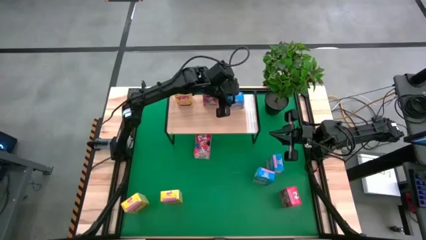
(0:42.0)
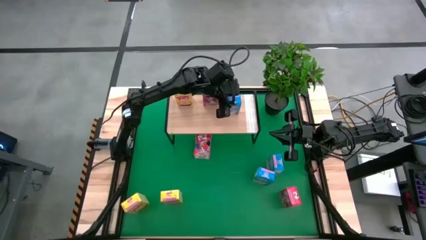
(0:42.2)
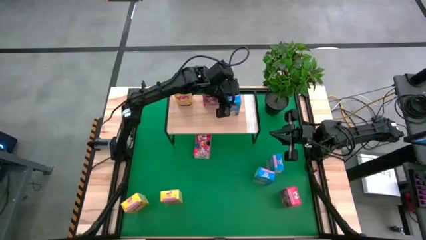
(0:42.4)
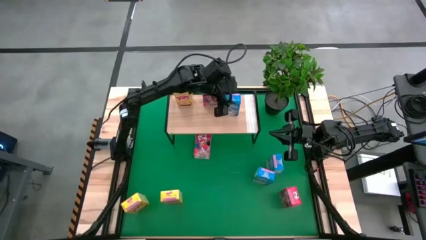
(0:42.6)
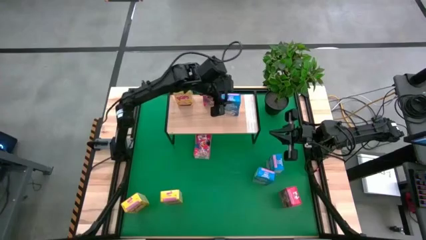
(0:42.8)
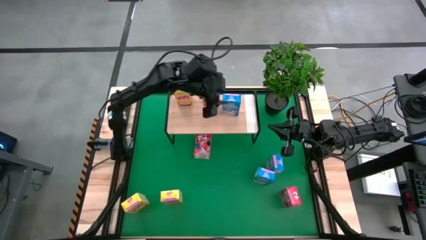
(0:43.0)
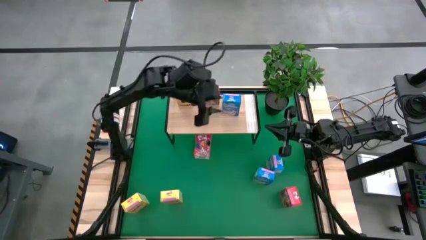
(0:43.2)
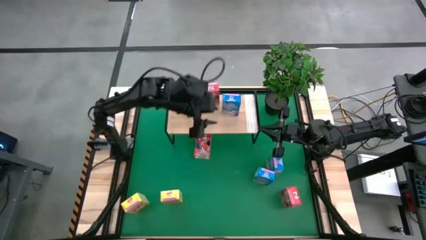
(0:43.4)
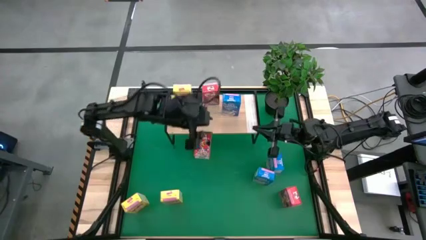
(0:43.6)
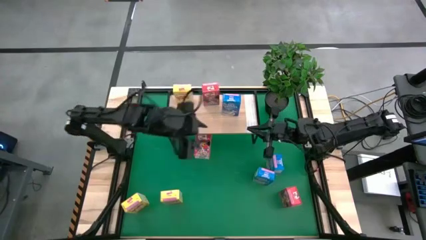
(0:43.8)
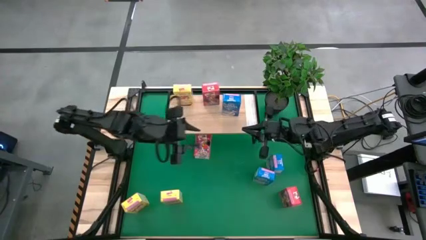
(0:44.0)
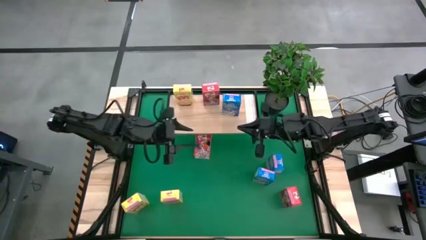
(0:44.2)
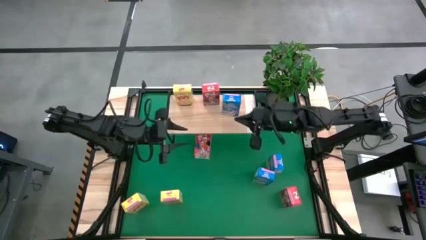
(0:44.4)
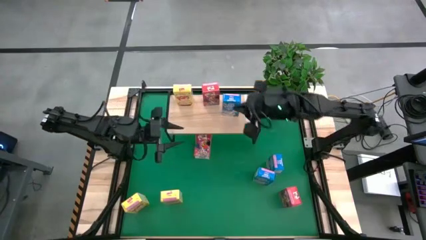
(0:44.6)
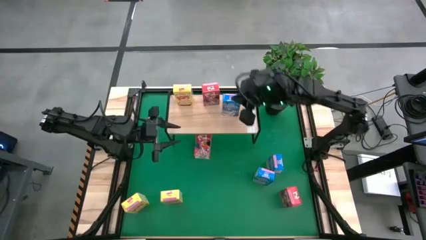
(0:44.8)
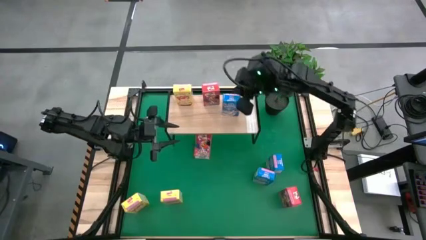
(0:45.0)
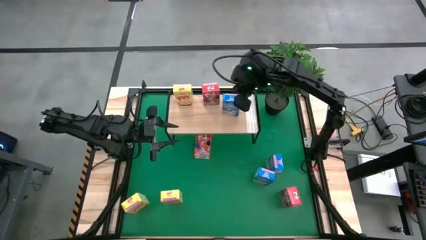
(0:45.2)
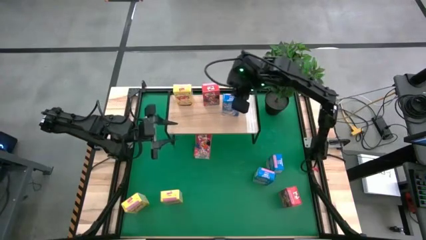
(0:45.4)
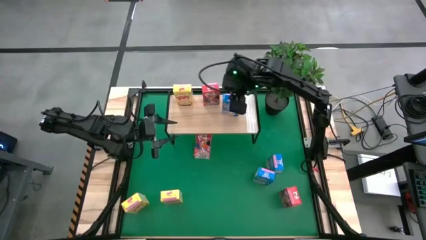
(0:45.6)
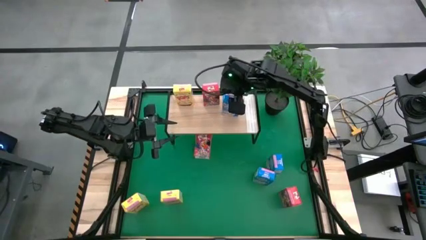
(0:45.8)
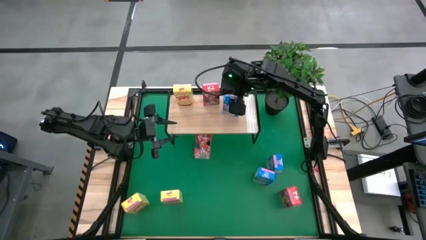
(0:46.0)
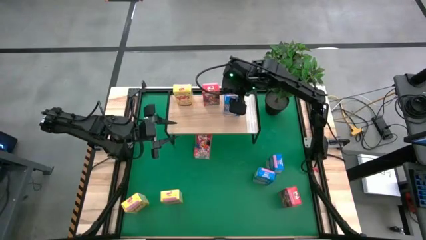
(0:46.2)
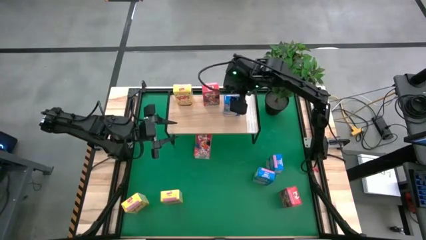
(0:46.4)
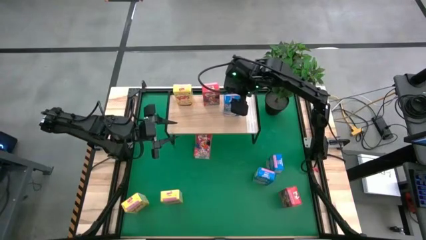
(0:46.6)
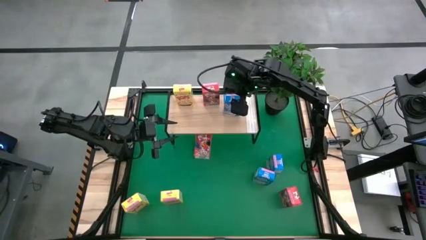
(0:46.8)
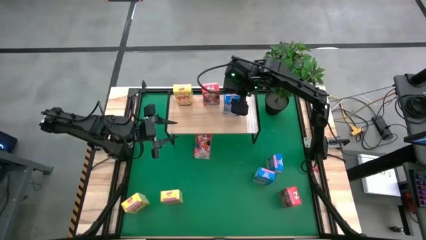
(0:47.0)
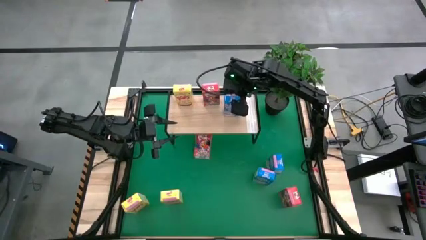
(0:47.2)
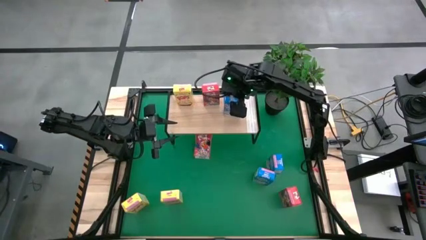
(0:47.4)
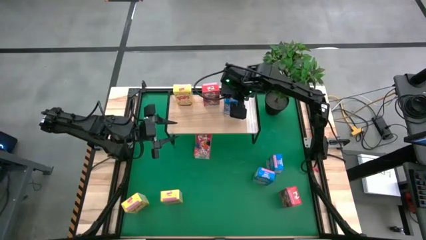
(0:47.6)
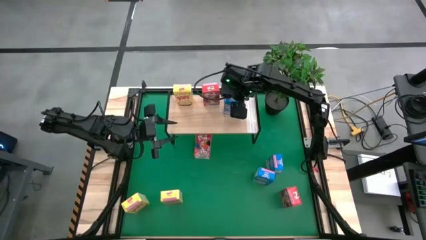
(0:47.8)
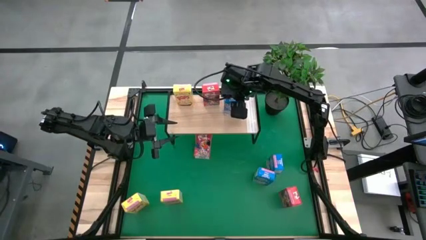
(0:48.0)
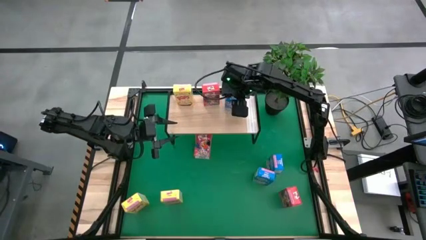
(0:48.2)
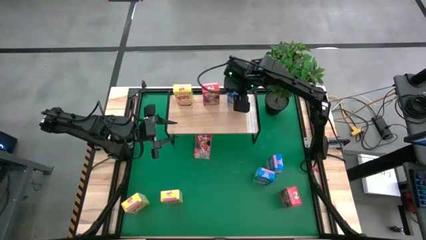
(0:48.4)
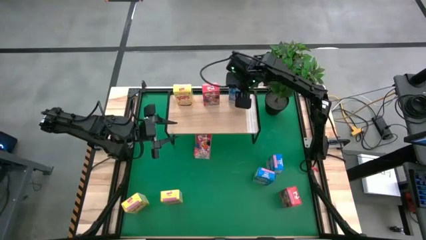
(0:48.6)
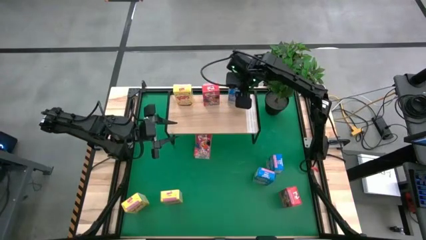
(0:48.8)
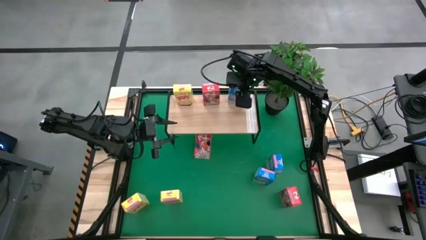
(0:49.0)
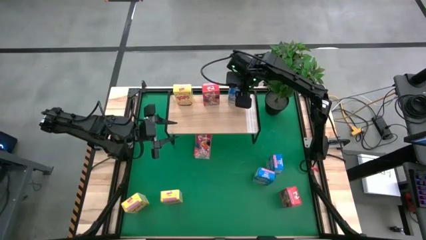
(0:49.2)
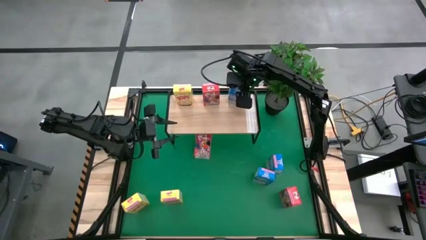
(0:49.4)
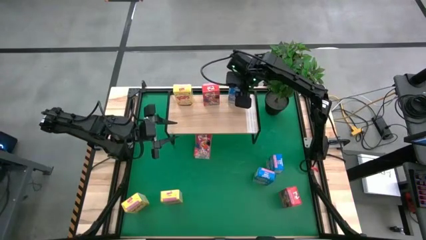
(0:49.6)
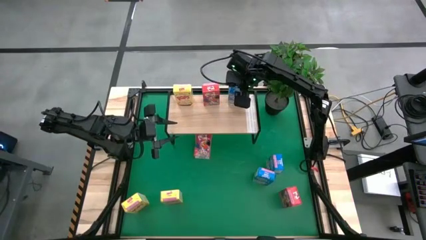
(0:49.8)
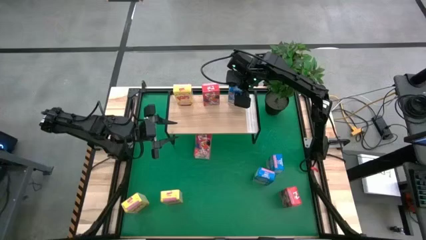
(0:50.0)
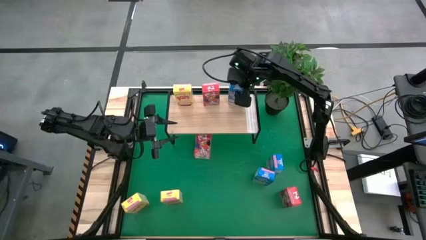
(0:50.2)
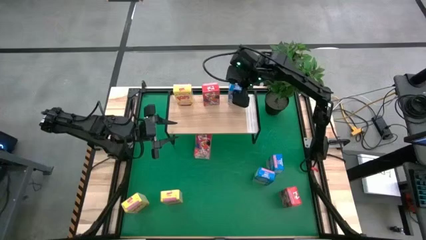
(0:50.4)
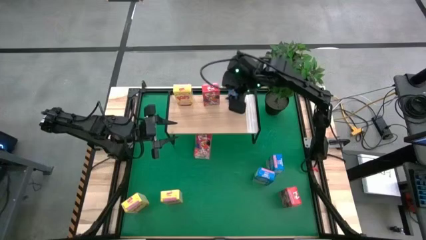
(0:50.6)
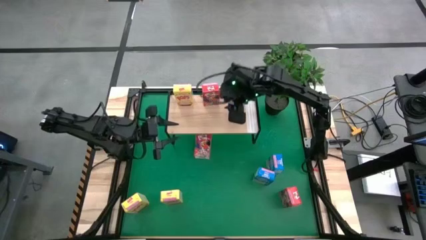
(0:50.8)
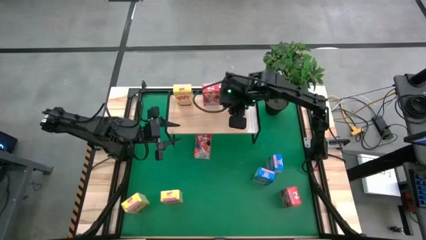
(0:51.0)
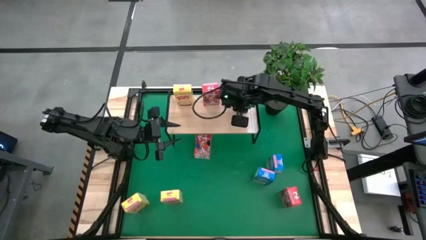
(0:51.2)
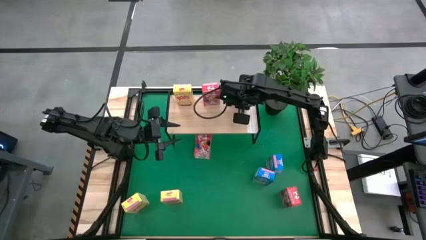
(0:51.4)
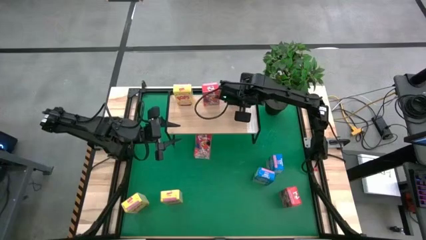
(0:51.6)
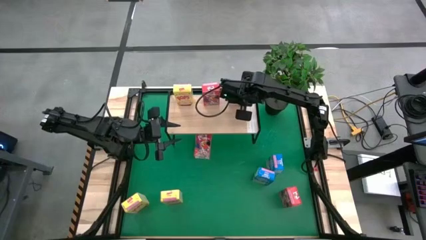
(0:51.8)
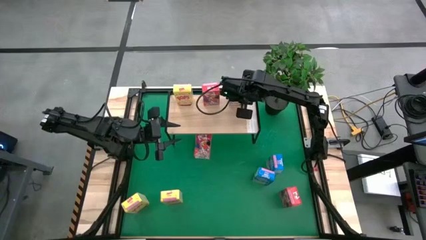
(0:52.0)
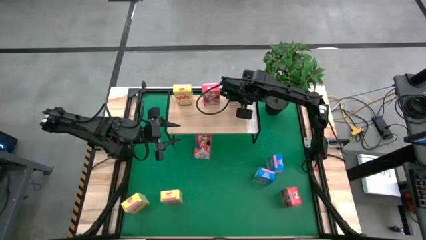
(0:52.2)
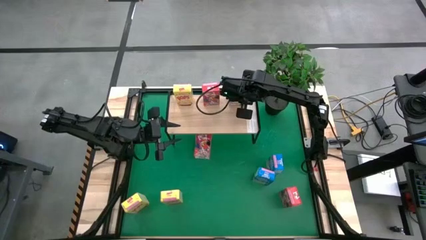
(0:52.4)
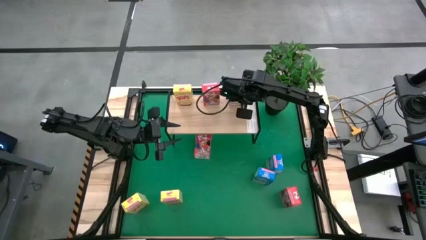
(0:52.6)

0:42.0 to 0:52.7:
Task: Stack cereal on shelf
Put the top left blue cereal box on the shelf

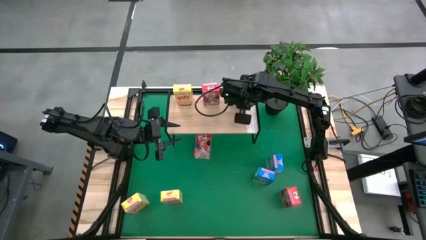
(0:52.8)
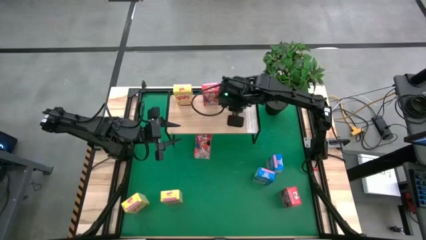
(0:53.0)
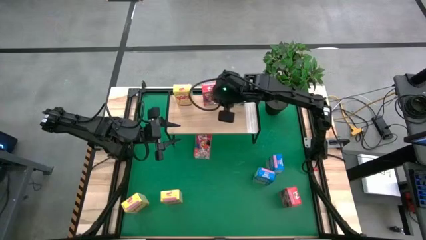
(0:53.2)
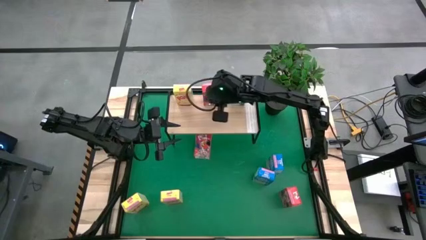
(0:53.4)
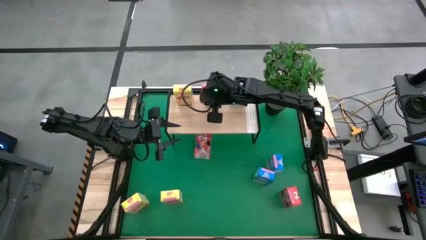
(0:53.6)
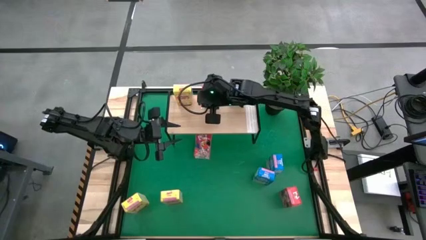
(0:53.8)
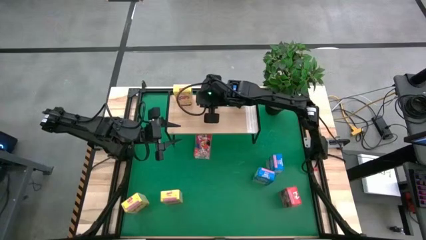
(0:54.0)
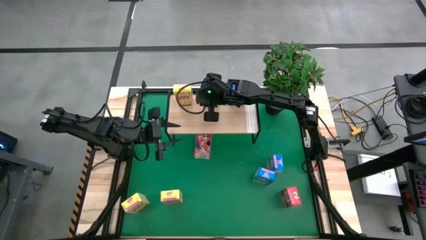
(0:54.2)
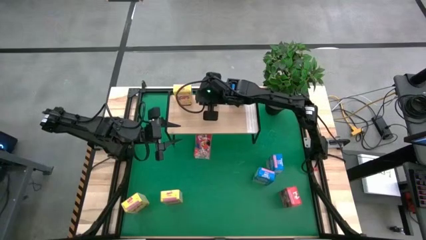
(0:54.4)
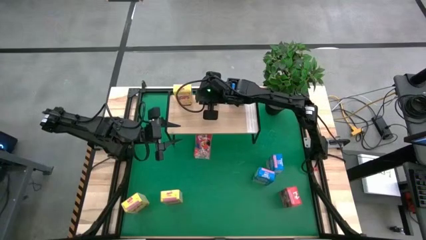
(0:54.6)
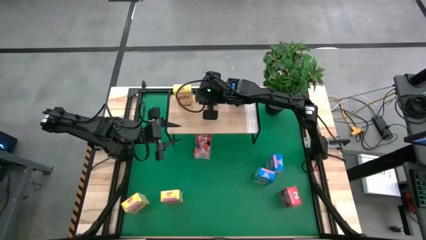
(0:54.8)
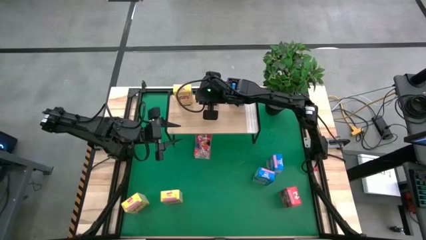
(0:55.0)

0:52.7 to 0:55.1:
Adjust the red cereal box on the shelf
